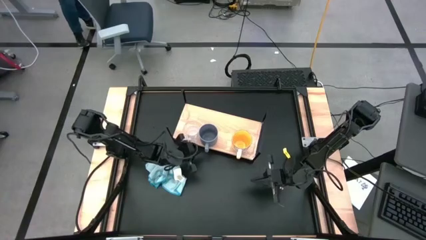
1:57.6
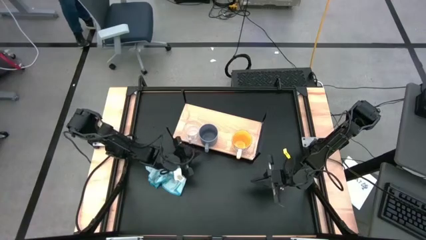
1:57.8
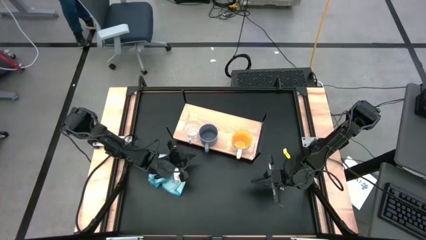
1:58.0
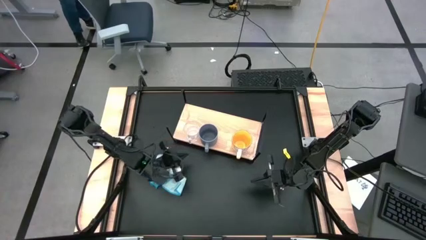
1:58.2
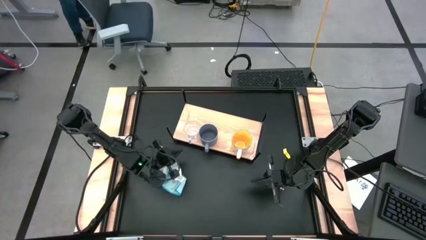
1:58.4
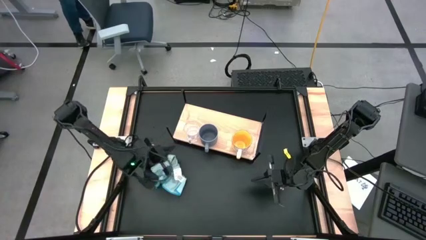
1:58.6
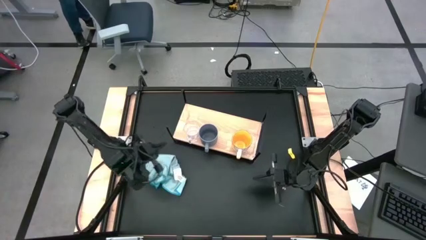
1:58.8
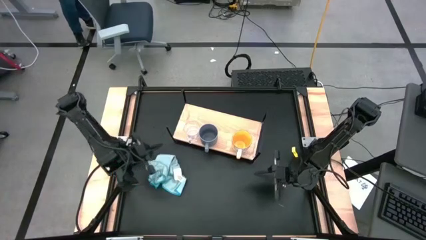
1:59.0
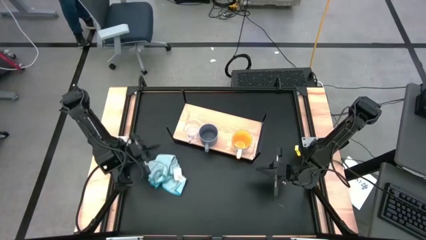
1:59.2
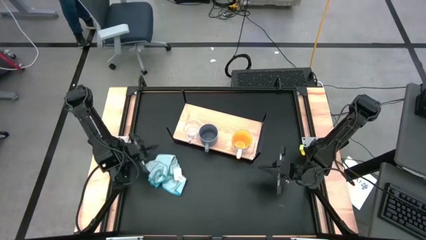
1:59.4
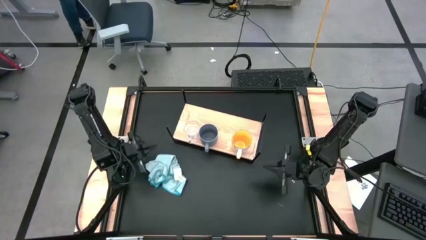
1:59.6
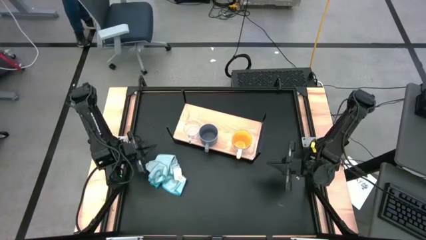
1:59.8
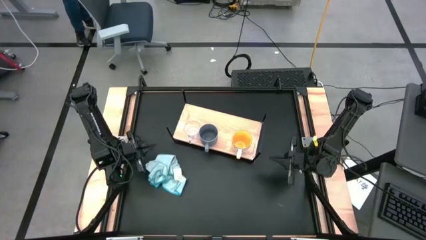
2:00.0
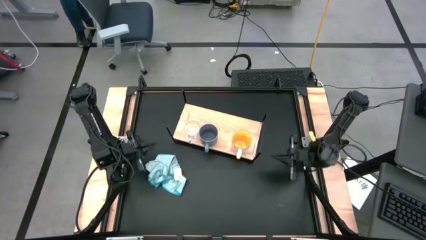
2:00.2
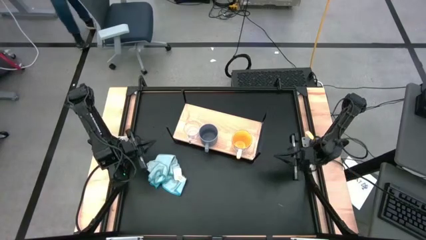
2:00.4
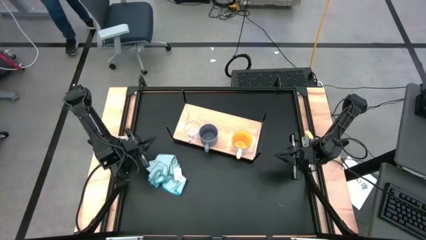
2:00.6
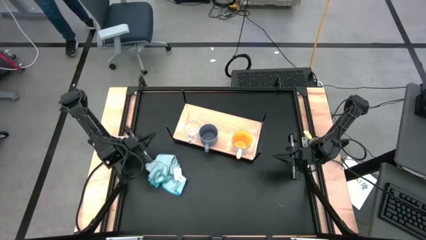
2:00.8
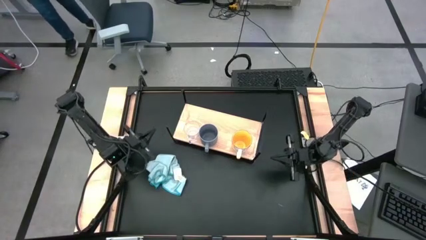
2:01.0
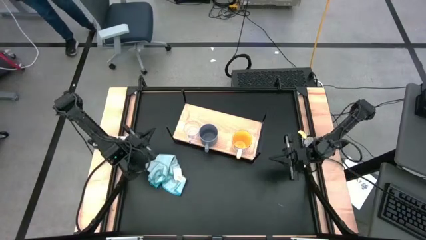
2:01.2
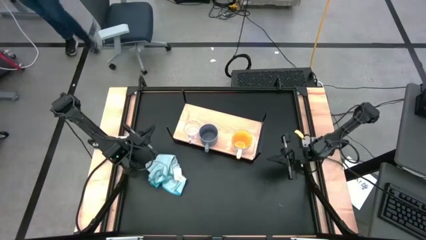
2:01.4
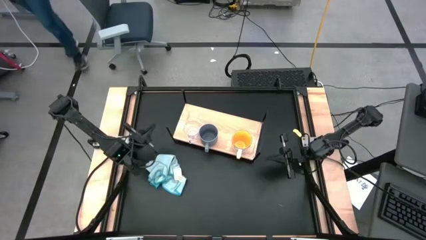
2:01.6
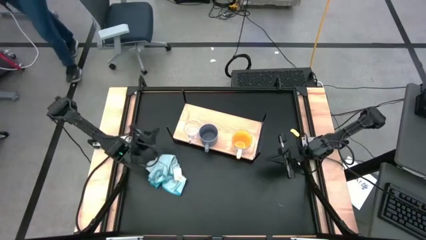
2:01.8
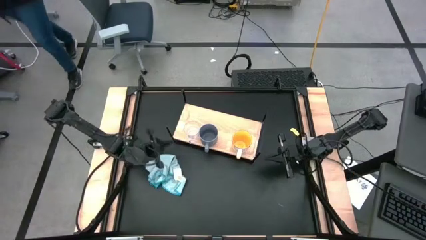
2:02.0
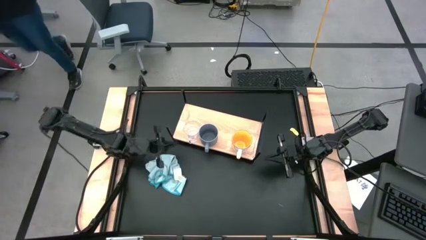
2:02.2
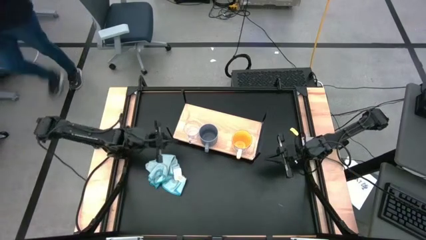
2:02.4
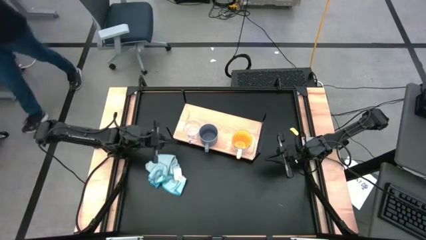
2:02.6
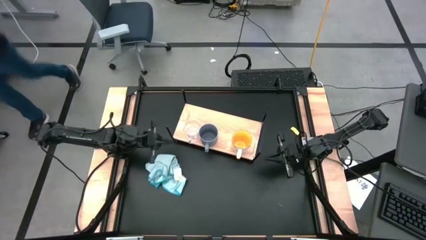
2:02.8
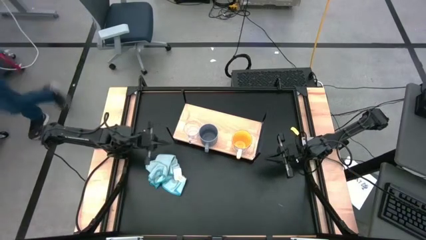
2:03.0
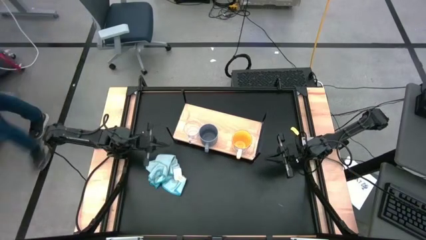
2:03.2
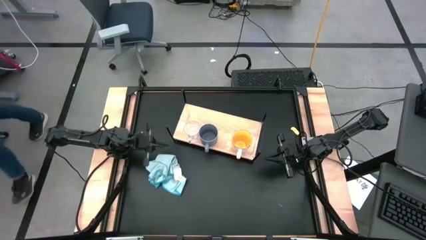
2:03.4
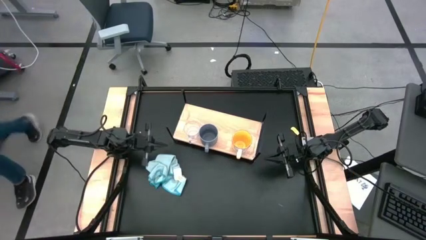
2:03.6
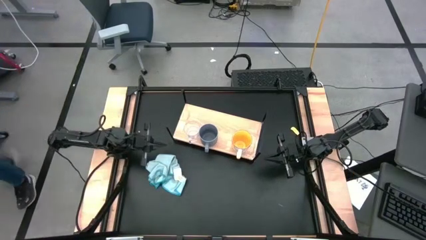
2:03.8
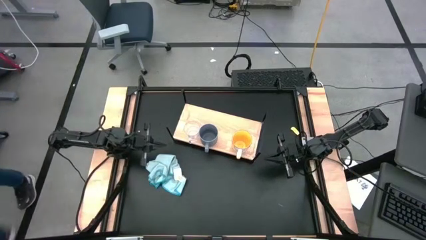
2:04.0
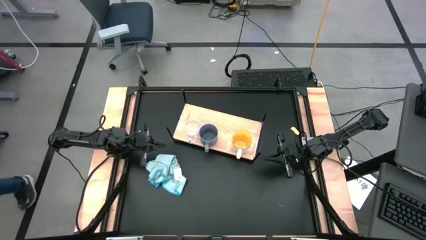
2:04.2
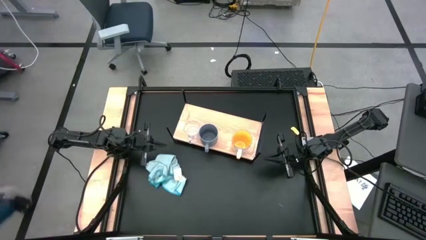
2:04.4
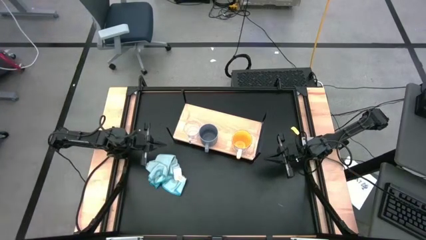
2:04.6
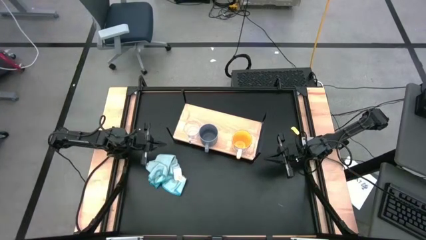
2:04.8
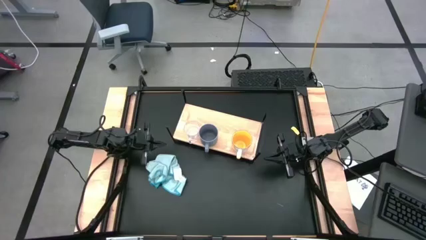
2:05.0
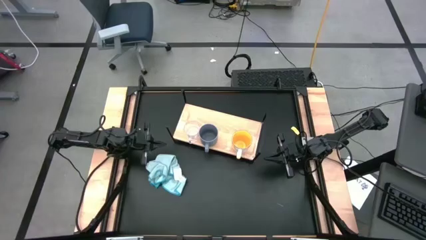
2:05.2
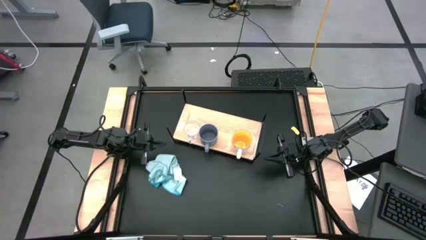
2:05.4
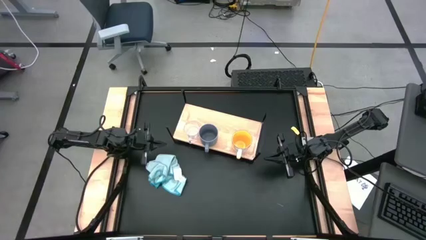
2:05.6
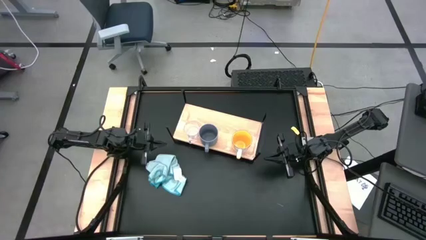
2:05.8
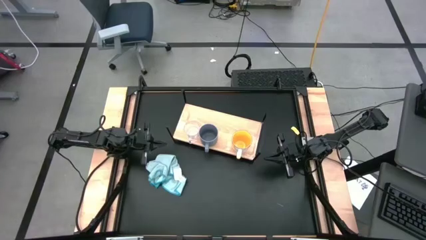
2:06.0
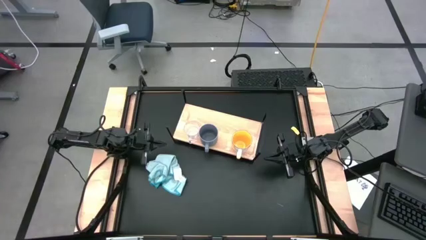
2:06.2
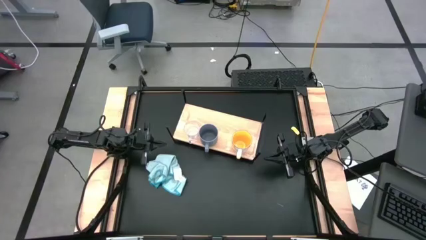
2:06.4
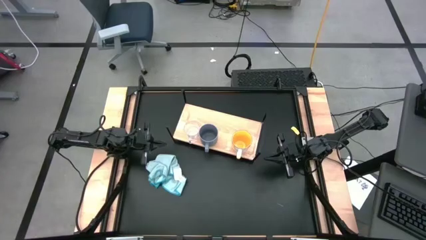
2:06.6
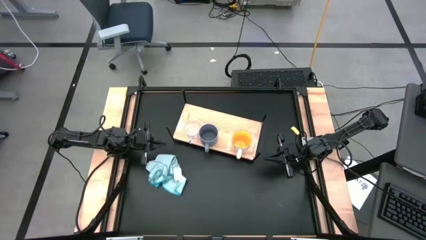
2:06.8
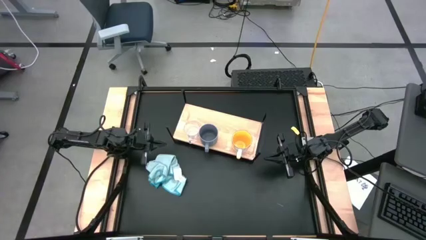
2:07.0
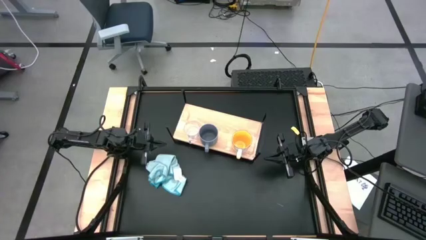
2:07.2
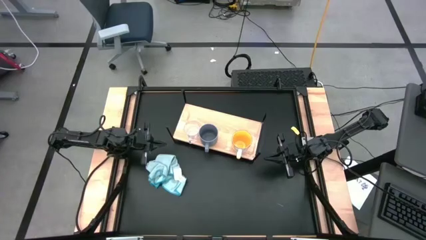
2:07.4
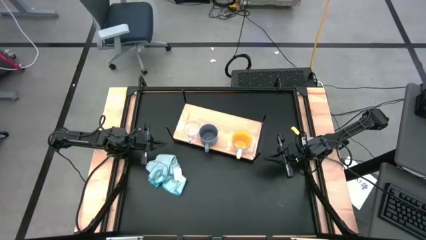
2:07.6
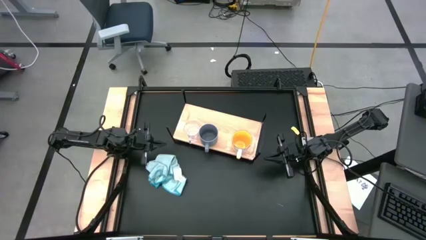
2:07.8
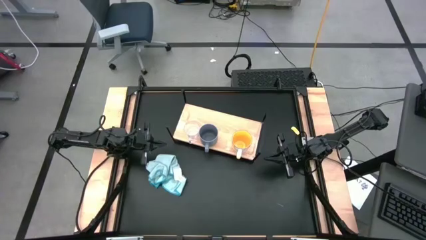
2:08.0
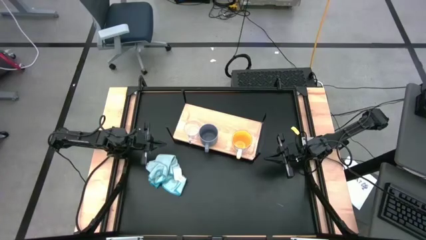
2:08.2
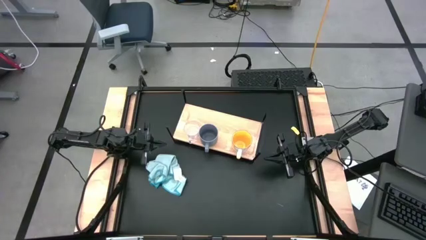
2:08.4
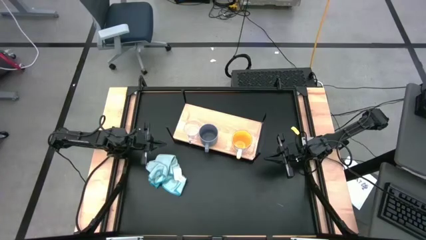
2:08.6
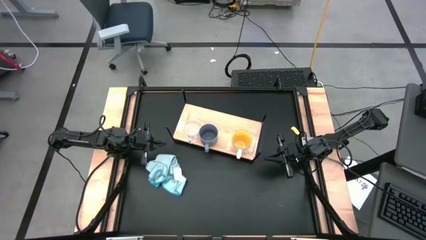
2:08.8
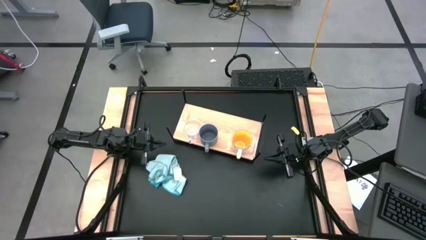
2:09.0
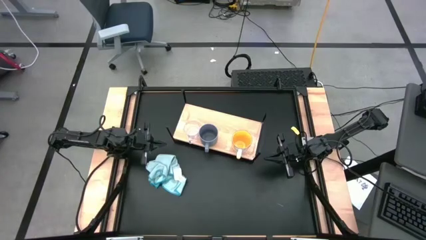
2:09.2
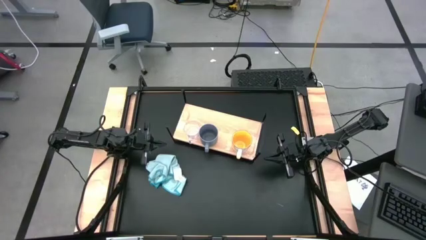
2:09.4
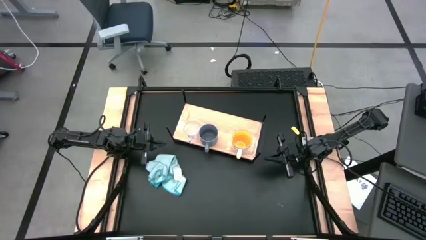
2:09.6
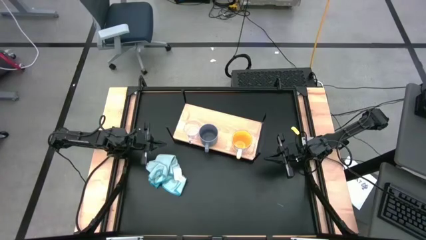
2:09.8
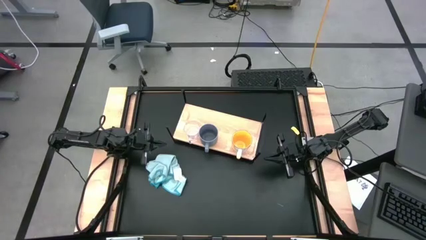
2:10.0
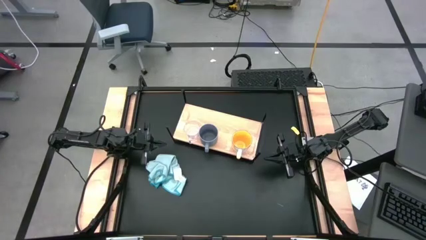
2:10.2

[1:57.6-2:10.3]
Task: Stack small to large cups/mugs on shelf
Return to Home Position

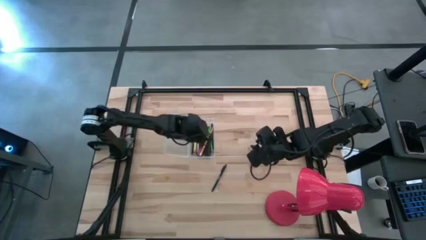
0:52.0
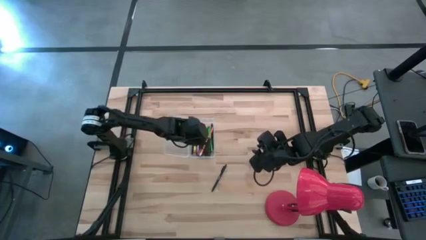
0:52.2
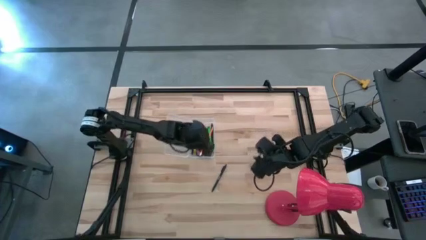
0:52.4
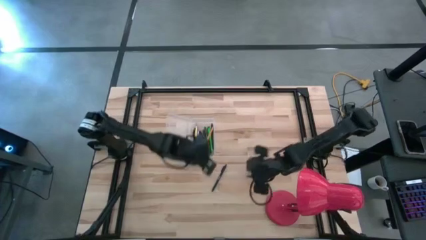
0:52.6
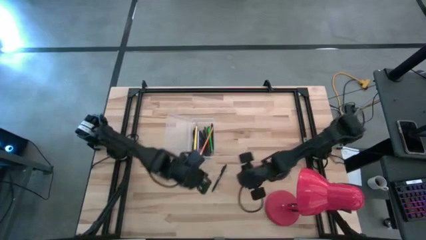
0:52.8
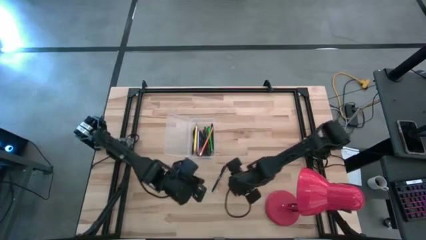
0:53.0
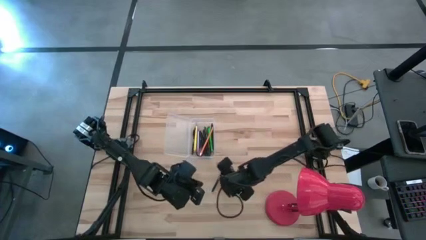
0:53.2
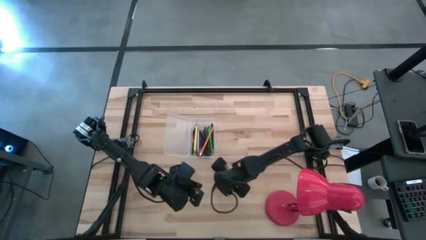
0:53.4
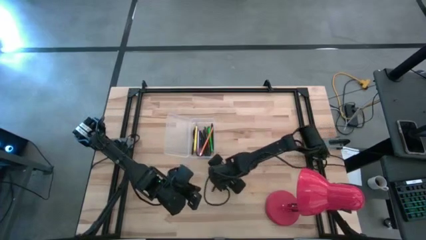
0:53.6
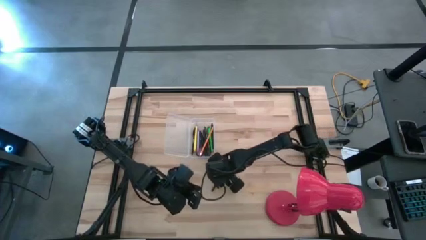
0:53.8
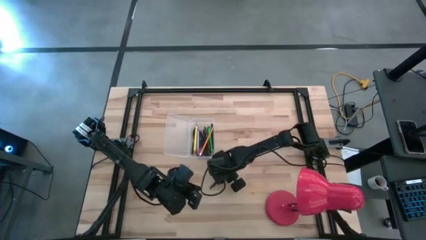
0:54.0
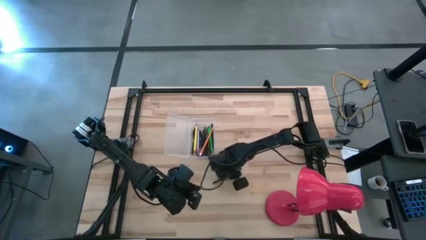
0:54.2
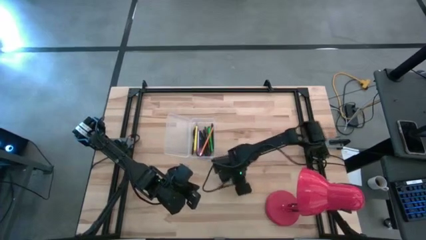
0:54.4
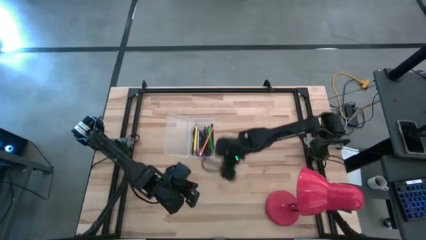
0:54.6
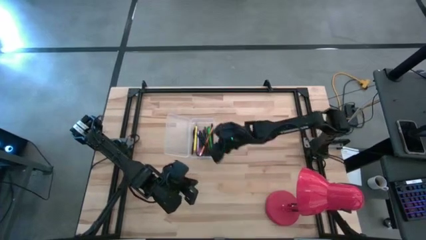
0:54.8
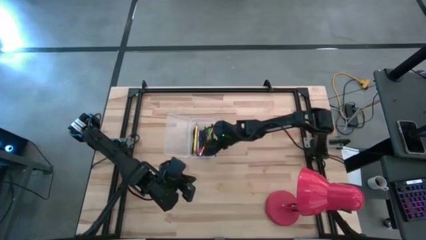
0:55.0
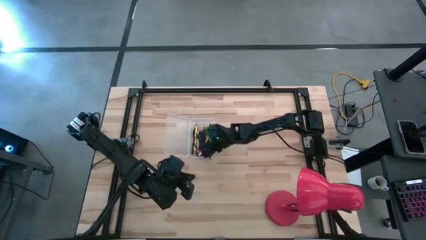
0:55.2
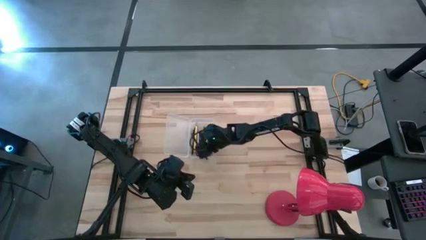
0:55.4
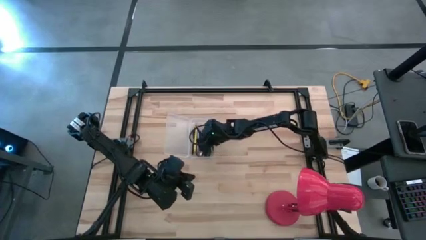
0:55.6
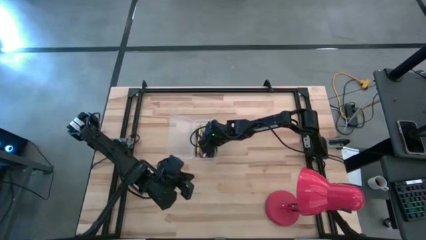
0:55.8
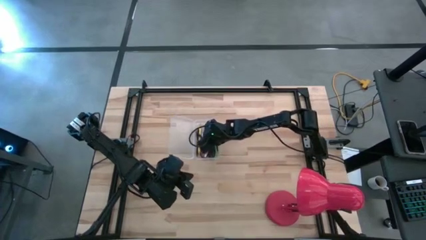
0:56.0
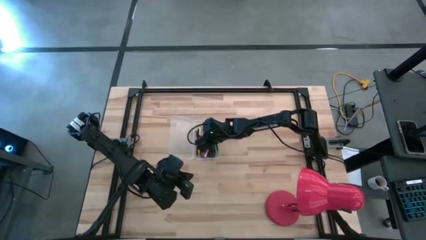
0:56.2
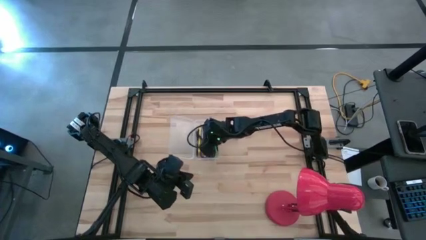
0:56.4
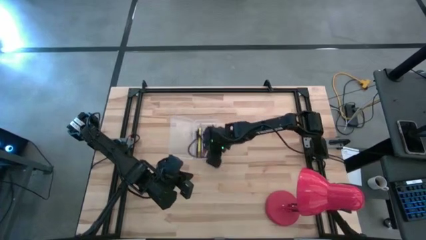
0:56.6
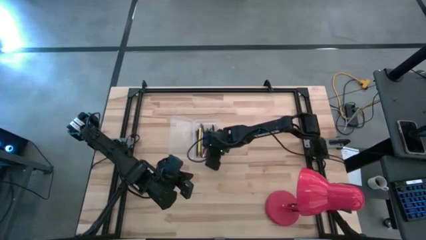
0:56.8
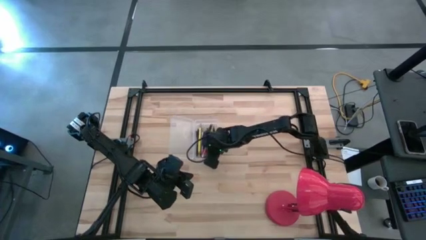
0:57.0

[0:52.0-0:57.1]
Task: Pick & place school supplies into a supply box
Put the black pen into the transparent supply box
